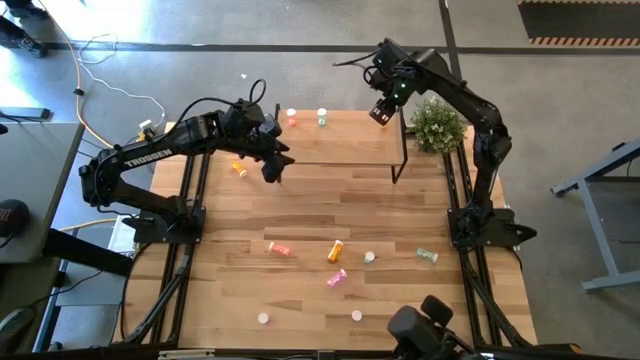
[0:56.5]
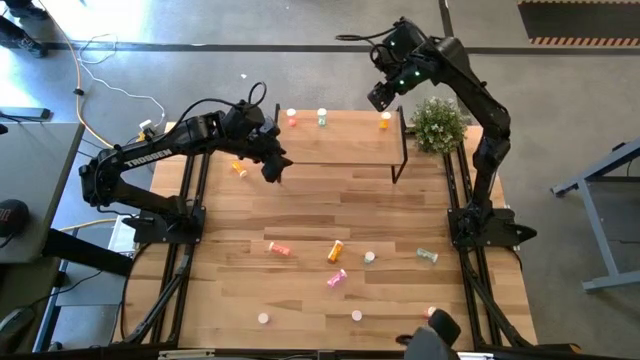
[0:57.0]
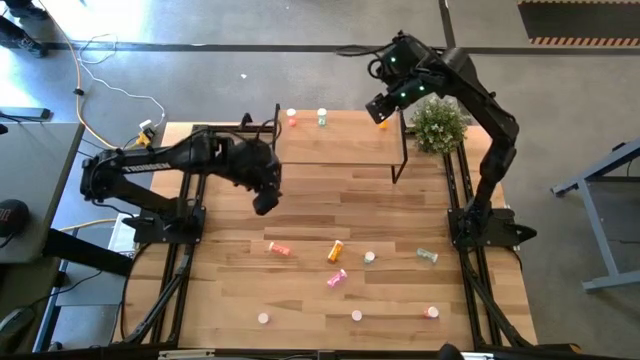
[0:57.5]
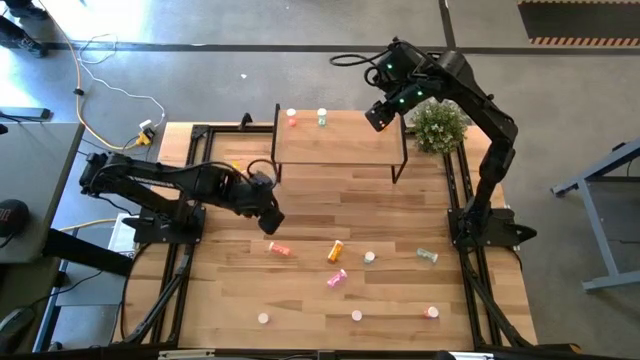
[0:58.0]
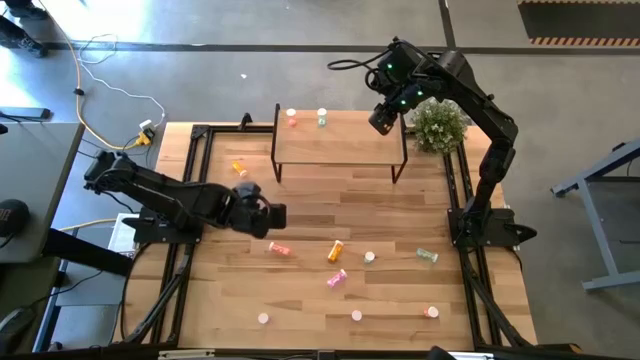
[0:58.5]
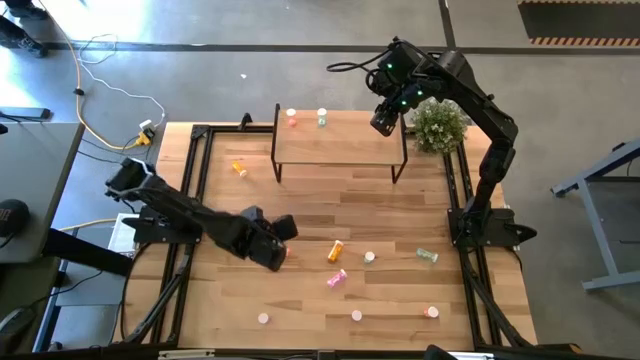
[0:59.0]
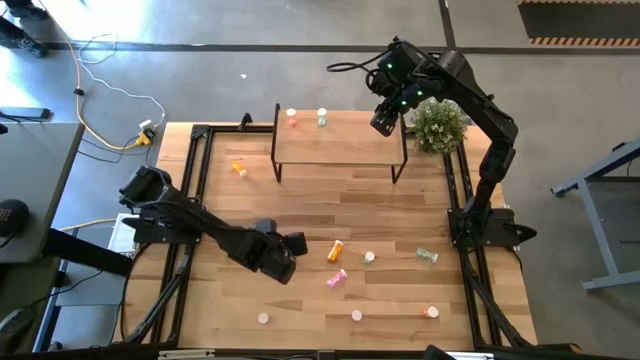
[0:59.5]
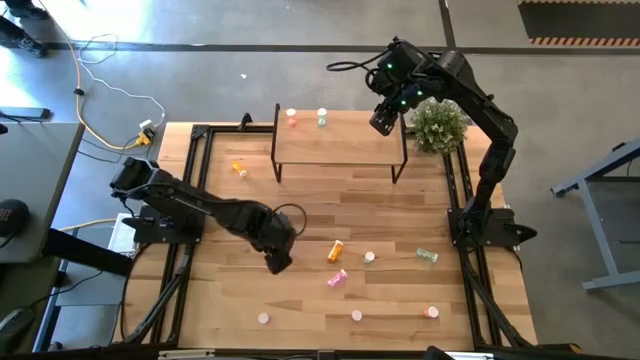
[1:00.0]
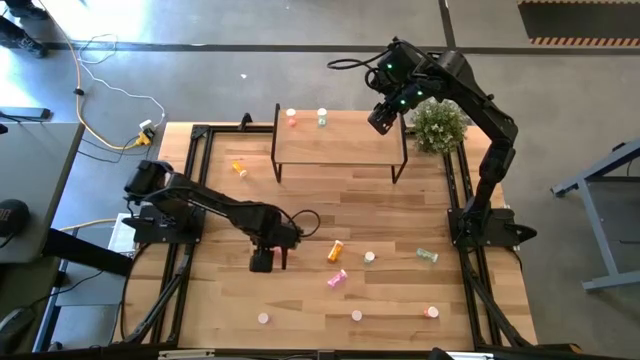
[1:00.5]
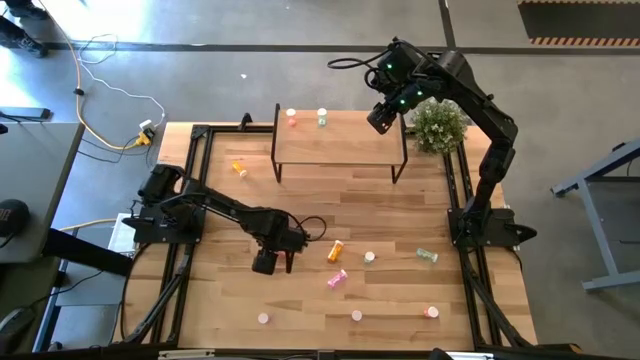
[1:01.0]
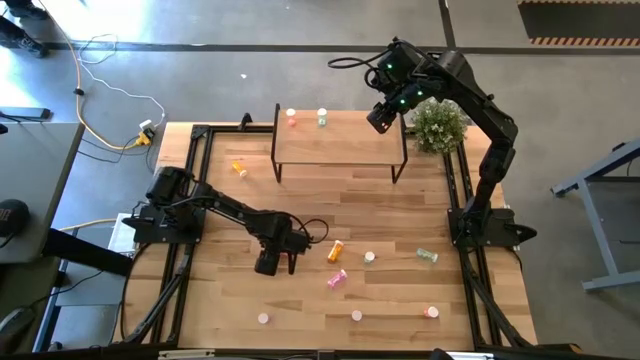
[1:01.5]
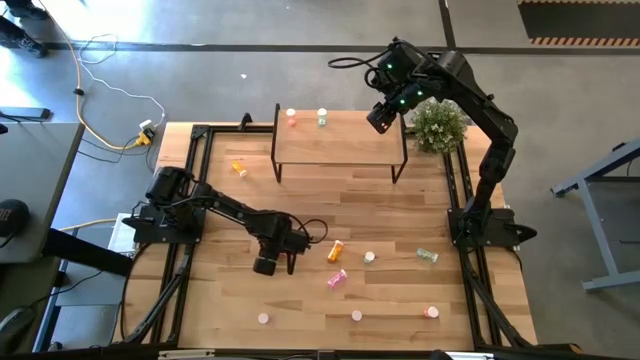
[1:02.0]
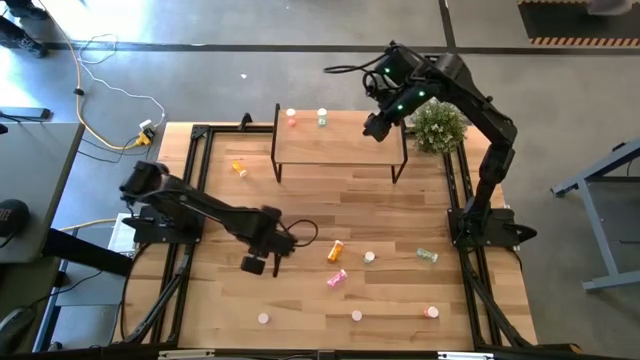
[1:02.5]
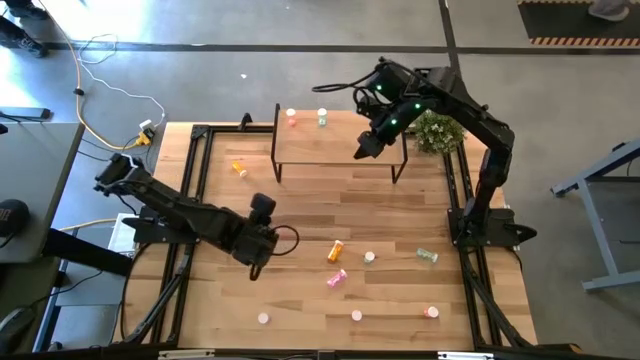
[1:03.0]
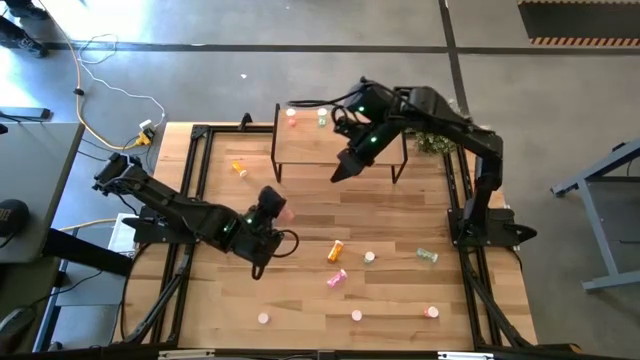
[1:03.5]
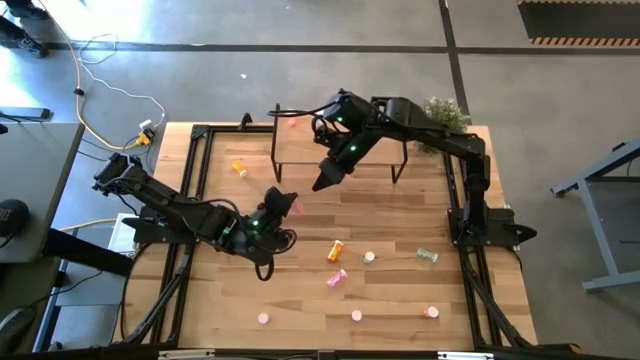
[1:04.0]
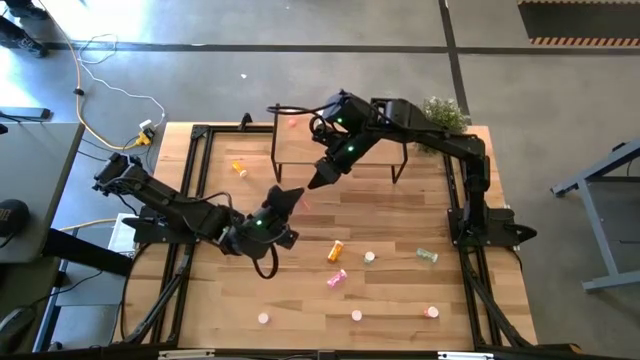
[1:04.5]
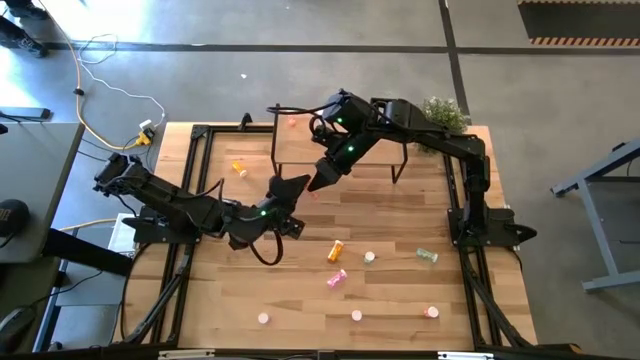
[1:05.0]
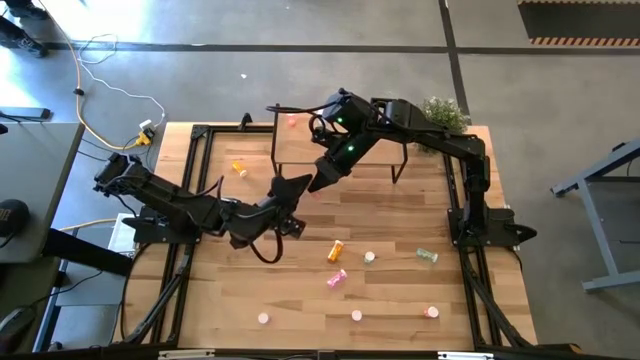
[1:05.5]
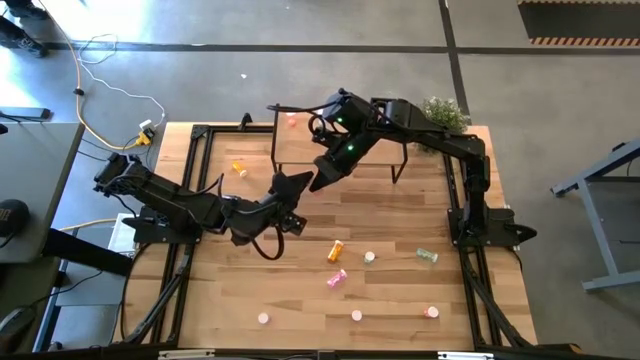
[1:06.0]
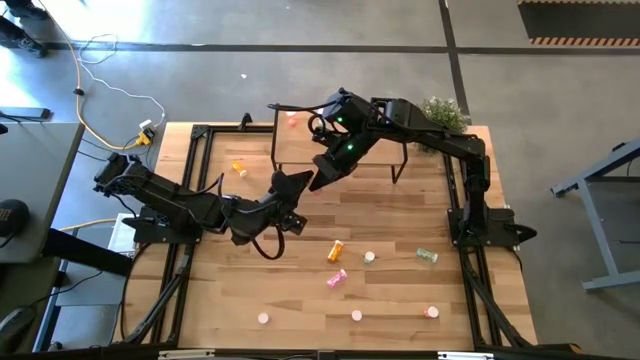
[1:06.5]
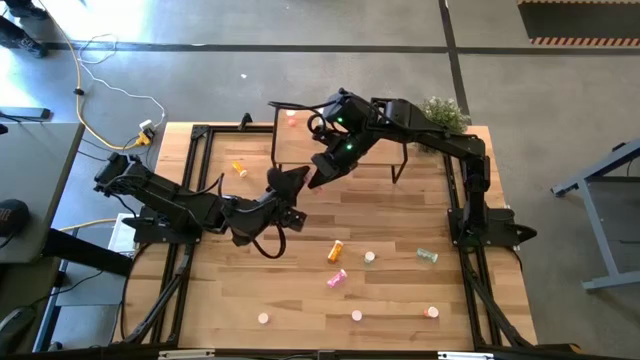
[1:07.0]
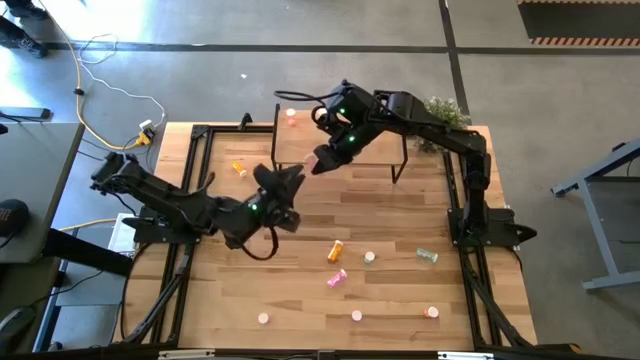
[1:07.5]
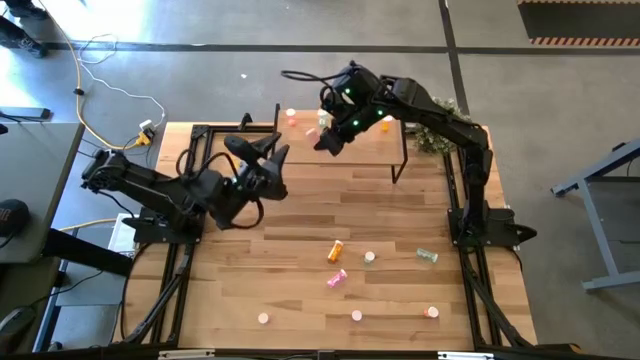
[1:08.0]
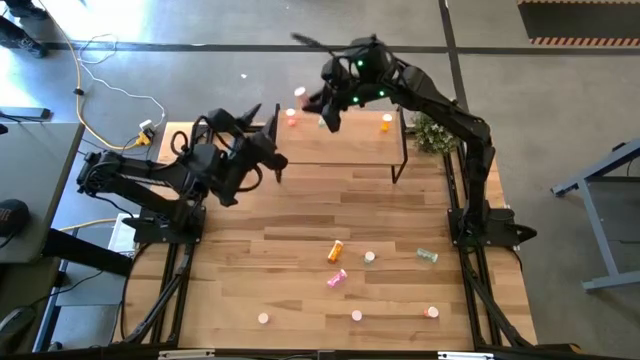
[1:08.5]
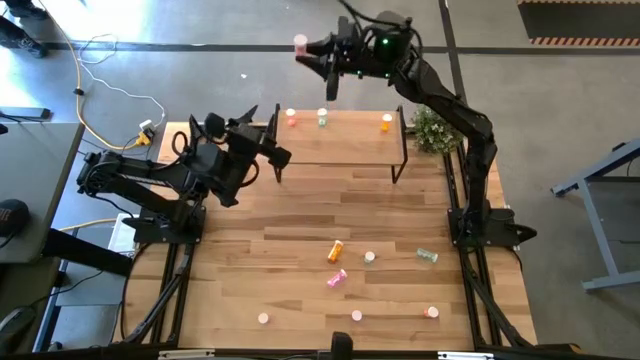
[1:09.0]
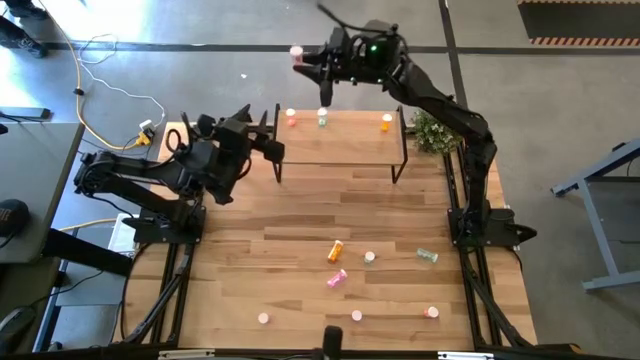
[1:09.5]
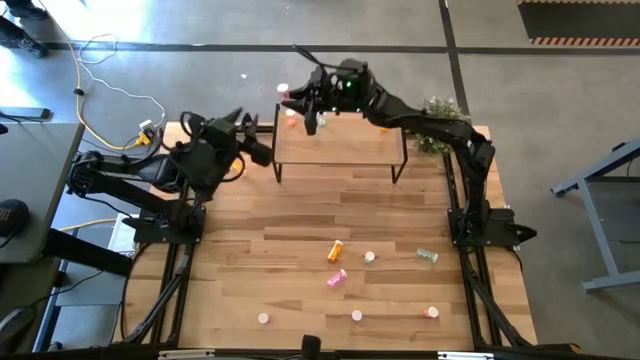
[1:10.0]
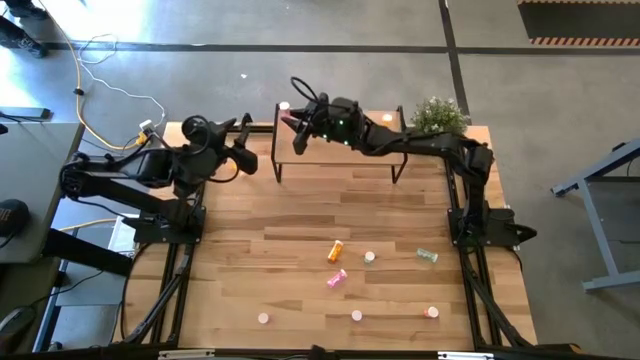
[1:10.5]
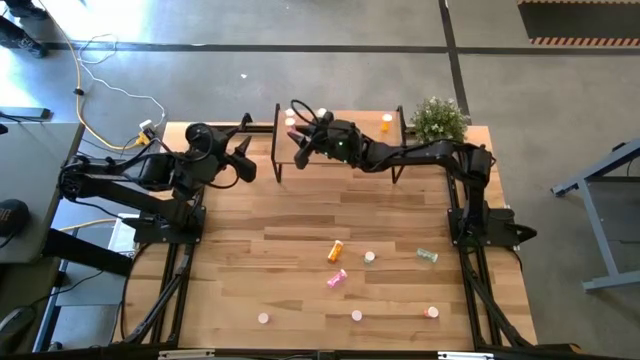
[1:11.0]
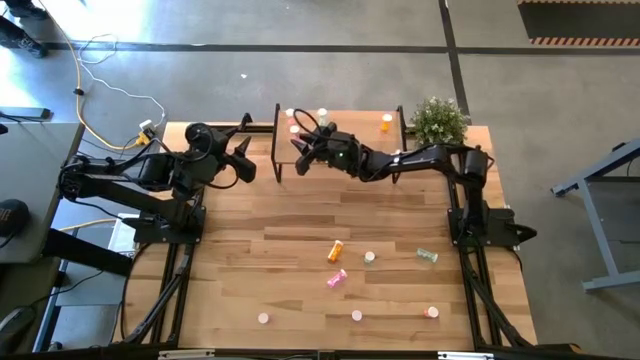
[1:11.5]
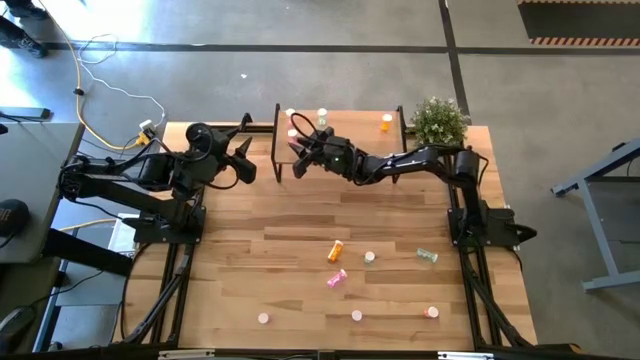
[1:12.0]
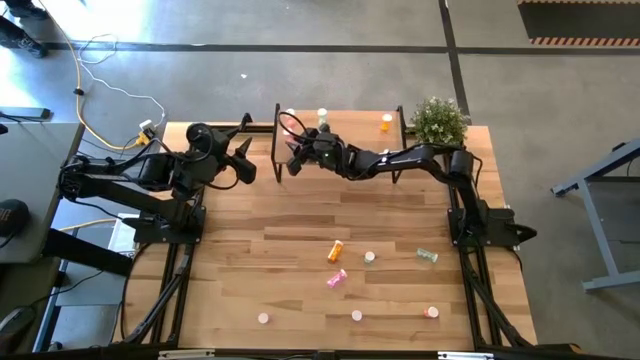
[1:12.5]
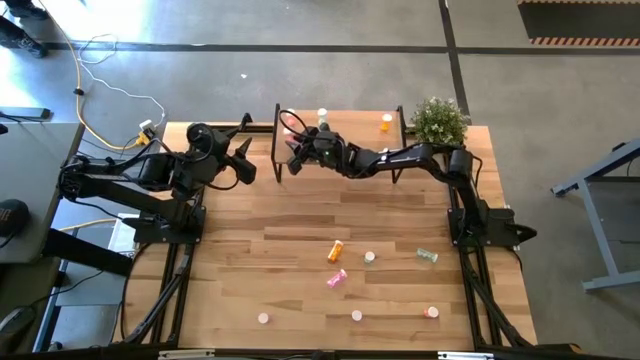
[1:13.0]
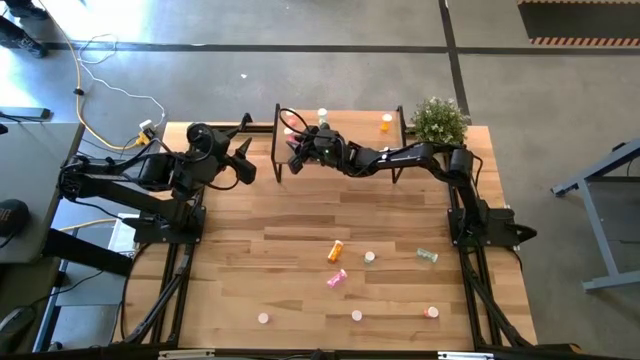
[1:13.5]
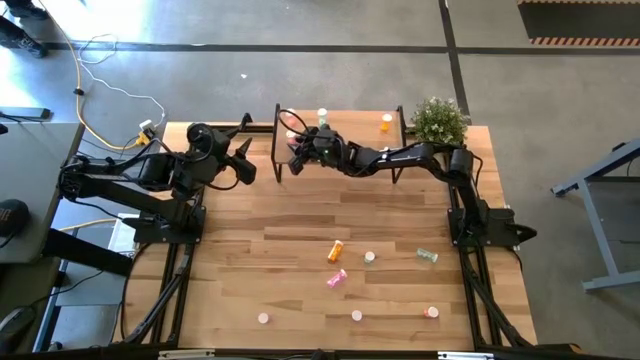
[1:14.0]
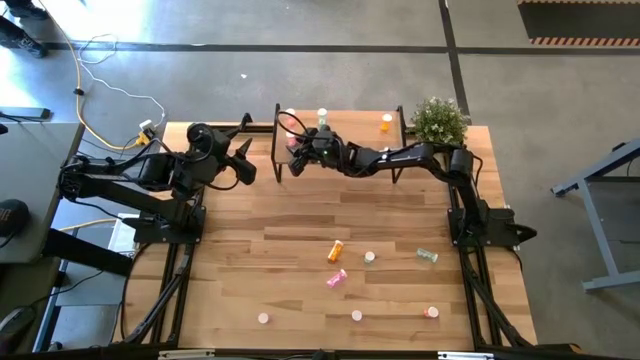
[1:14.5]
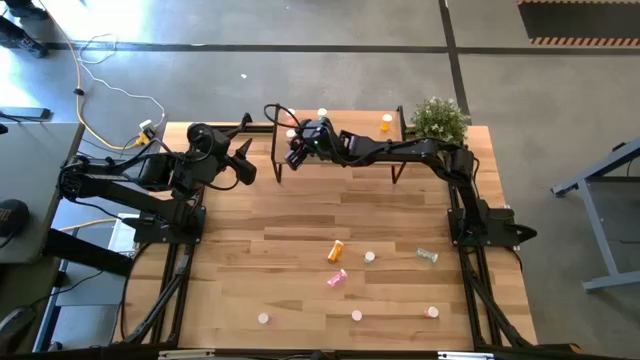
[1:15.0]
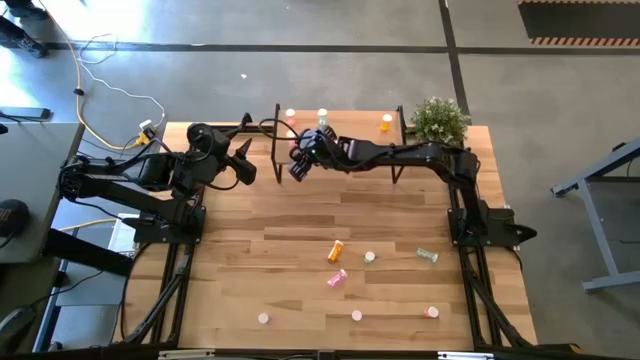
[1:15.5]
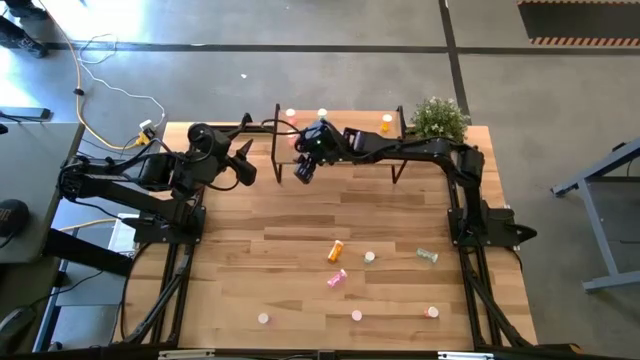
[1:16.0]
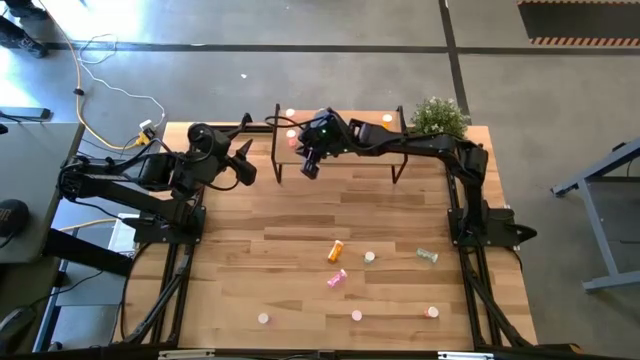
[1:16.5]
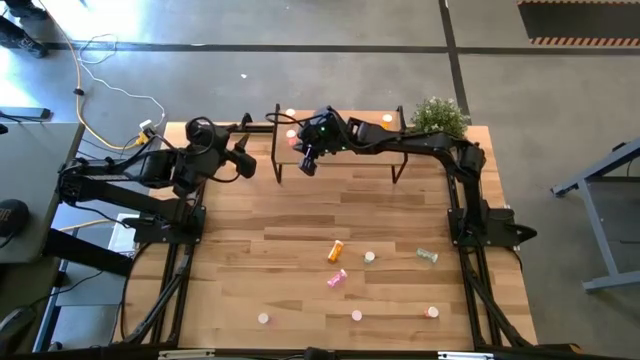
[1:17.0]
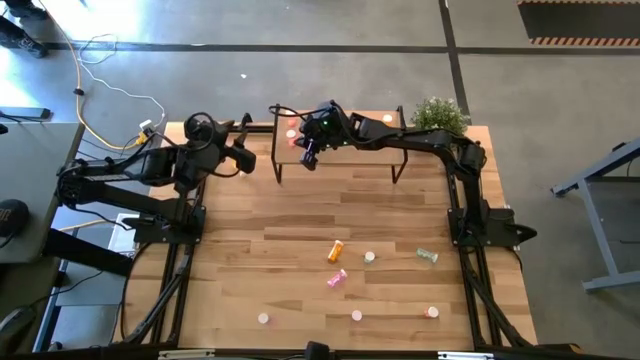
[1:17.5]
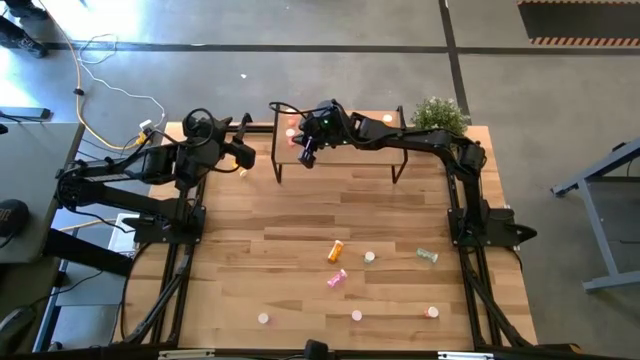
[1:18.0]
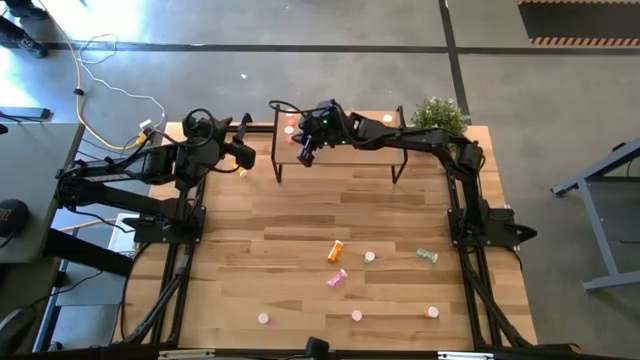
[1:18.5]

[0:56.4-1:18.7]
Task: Pick and place medicine bottles onto shelf by color
Put the top pink pill bottle on the shelf aligned with the other pink pill bottle
